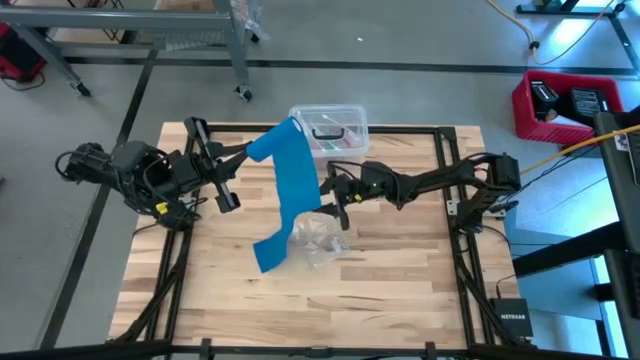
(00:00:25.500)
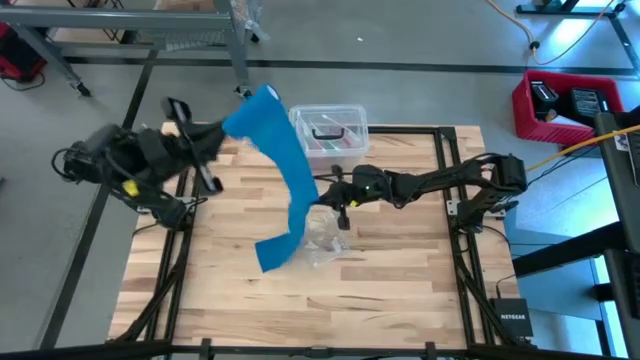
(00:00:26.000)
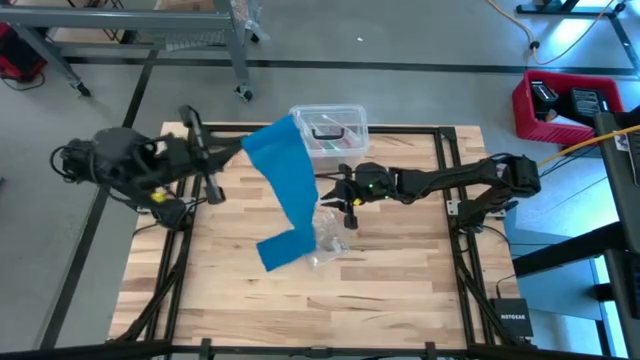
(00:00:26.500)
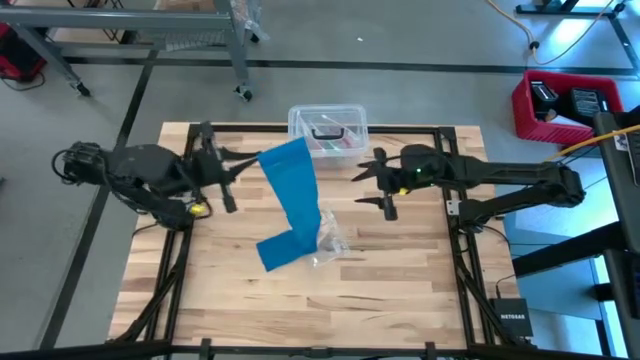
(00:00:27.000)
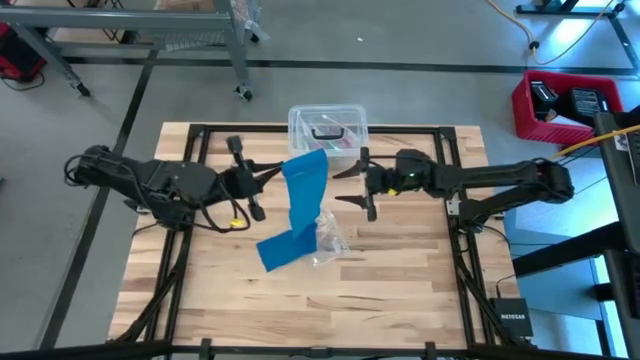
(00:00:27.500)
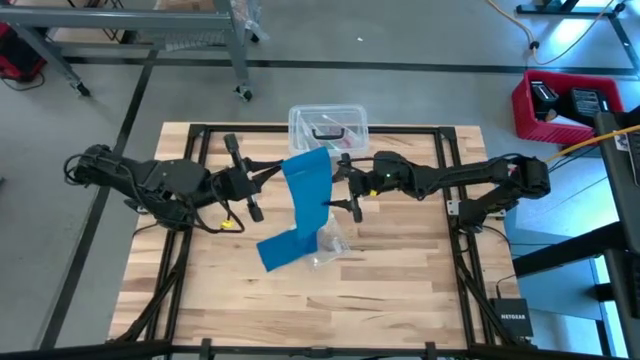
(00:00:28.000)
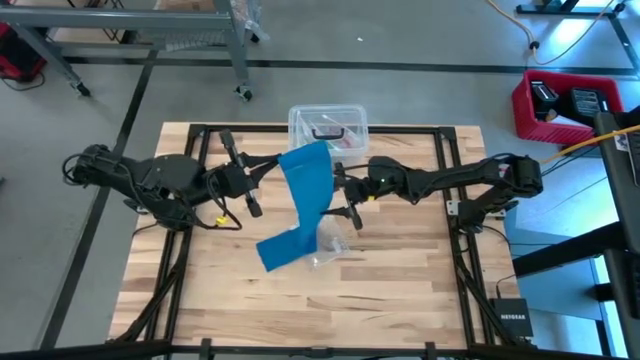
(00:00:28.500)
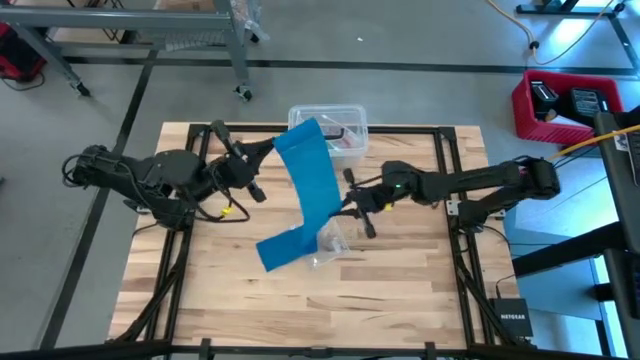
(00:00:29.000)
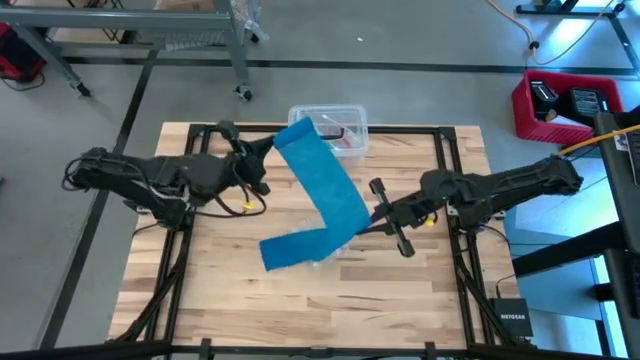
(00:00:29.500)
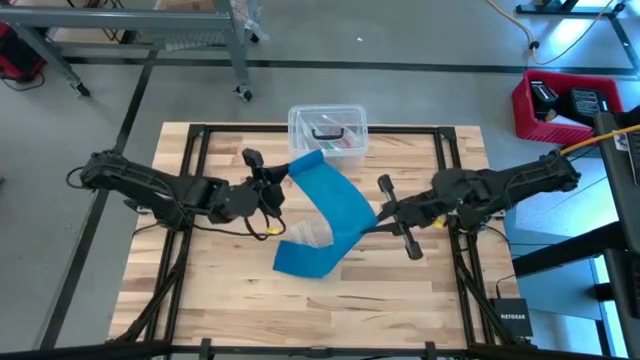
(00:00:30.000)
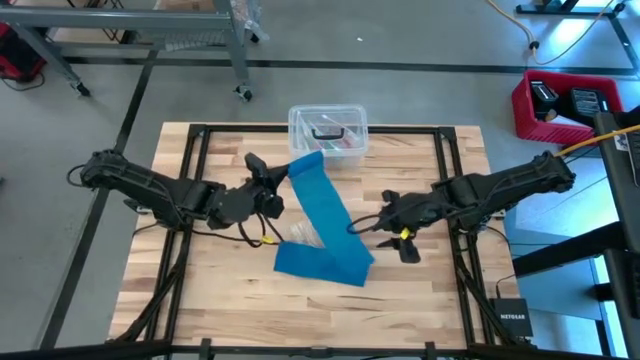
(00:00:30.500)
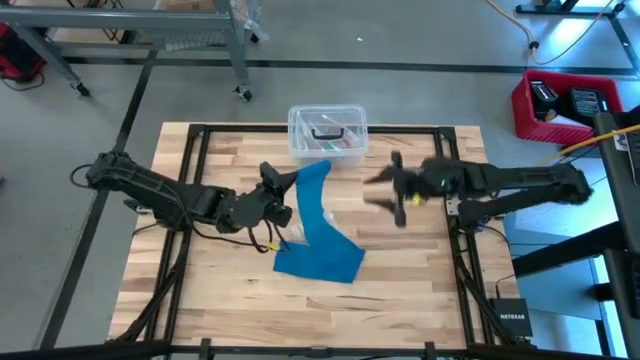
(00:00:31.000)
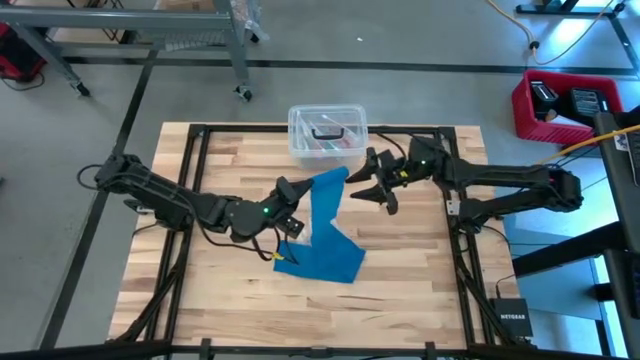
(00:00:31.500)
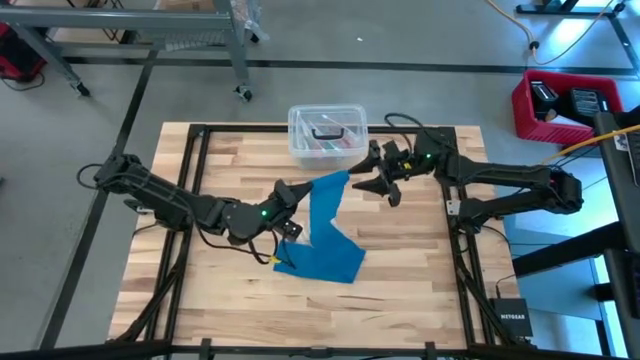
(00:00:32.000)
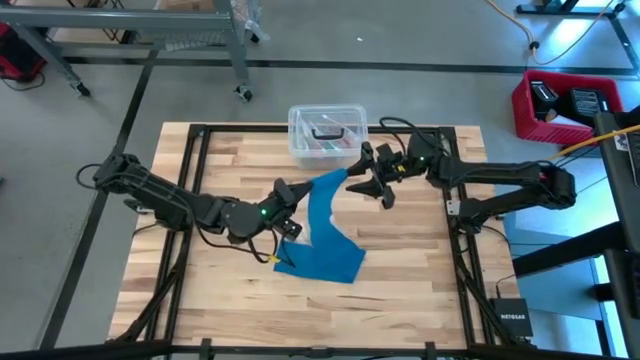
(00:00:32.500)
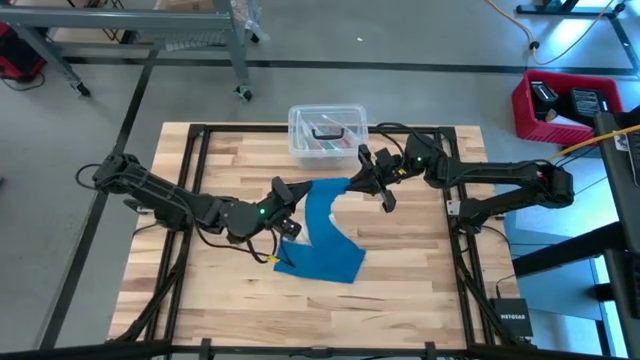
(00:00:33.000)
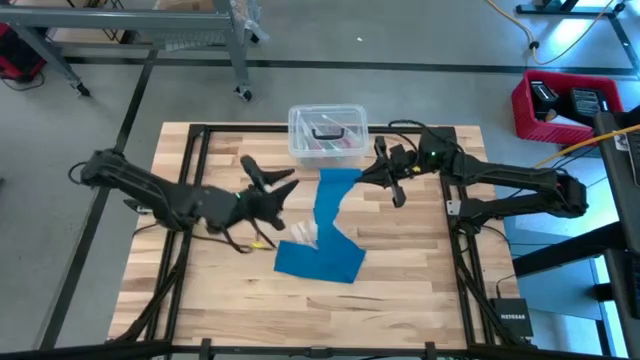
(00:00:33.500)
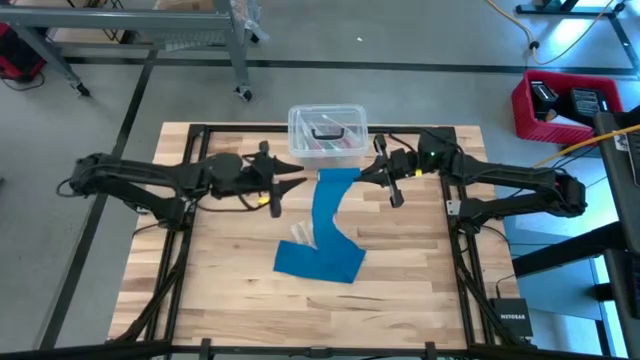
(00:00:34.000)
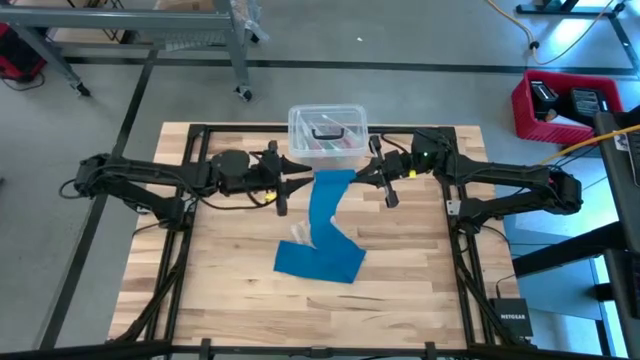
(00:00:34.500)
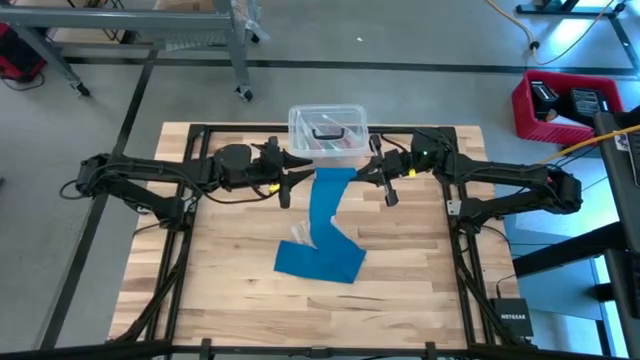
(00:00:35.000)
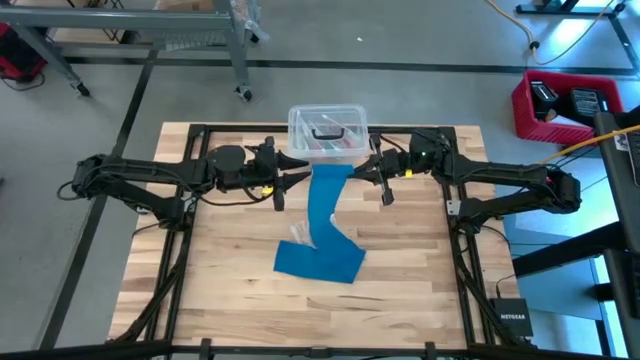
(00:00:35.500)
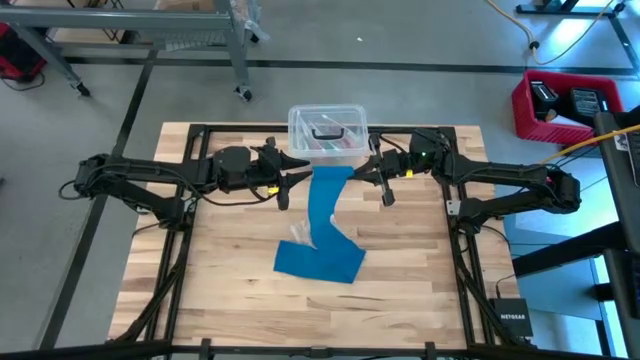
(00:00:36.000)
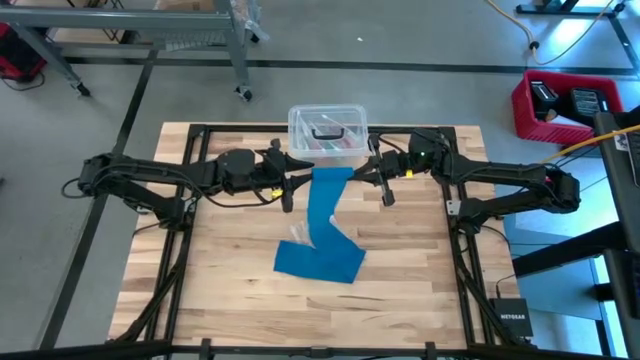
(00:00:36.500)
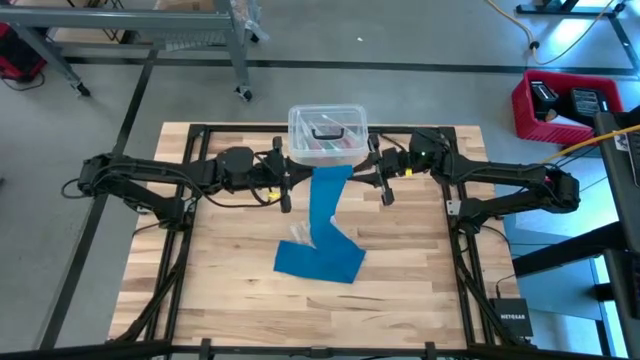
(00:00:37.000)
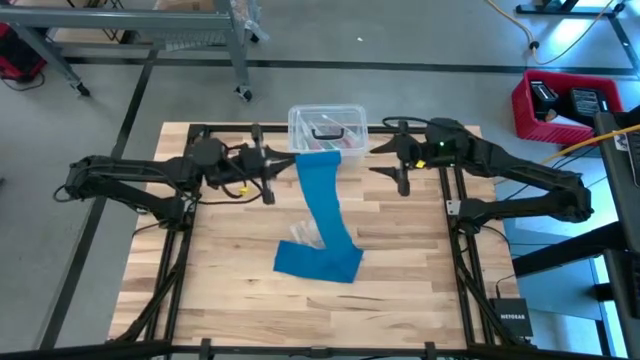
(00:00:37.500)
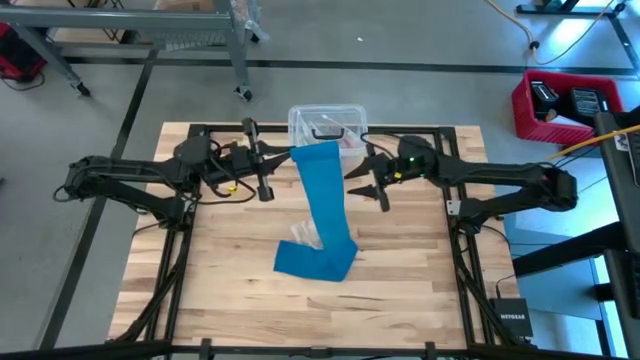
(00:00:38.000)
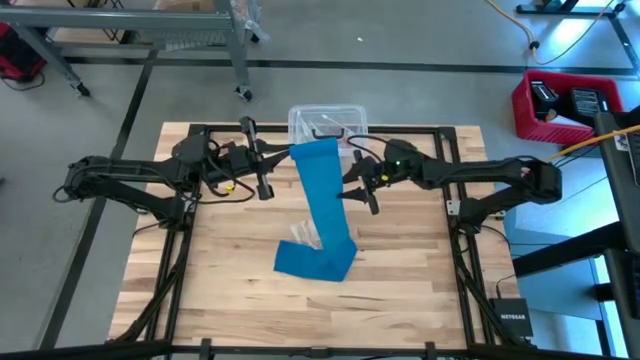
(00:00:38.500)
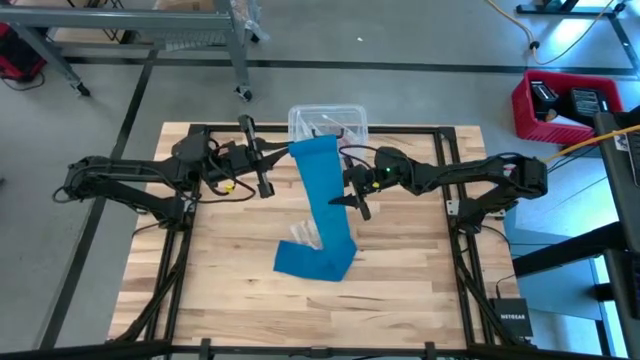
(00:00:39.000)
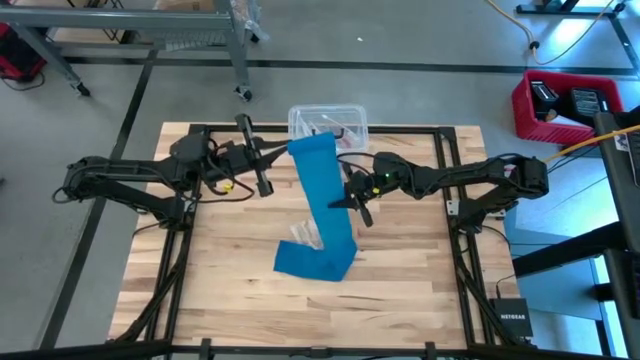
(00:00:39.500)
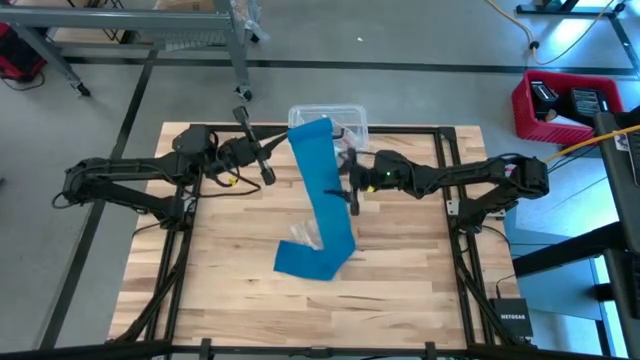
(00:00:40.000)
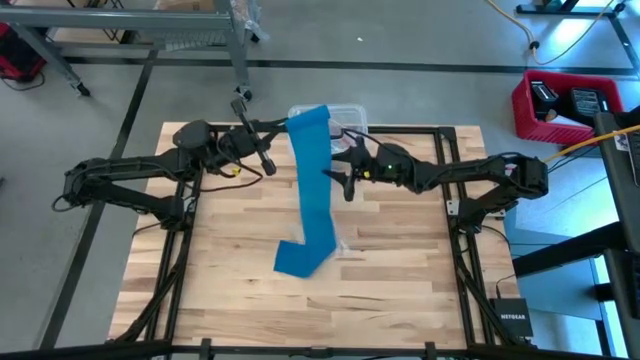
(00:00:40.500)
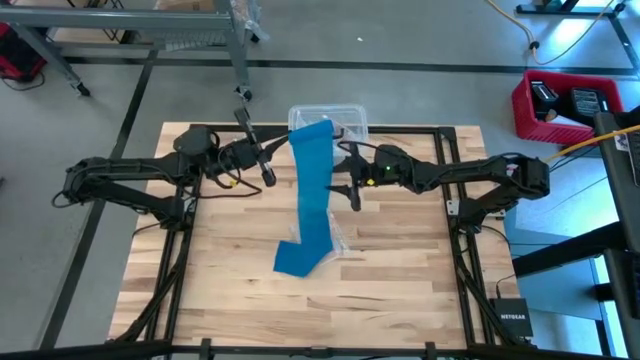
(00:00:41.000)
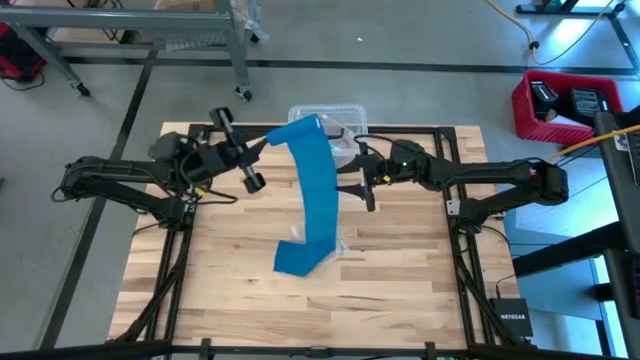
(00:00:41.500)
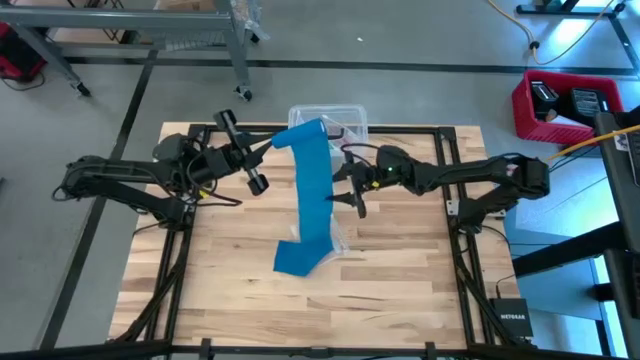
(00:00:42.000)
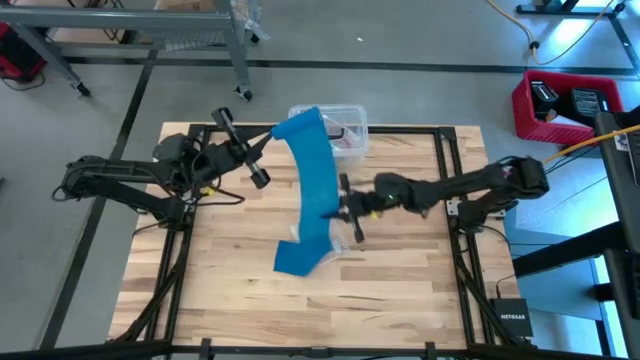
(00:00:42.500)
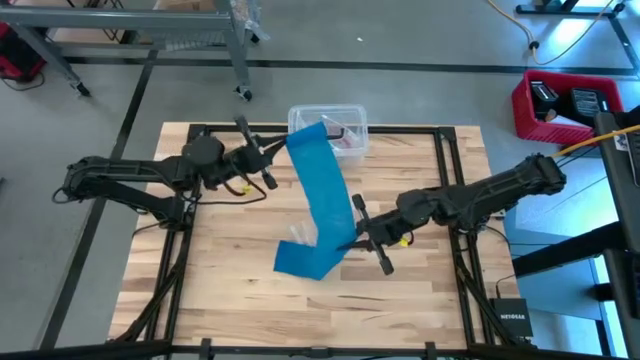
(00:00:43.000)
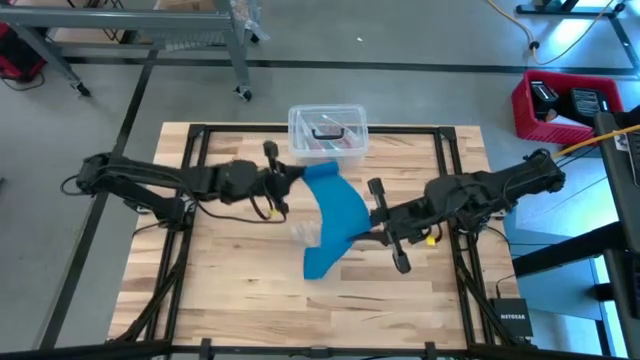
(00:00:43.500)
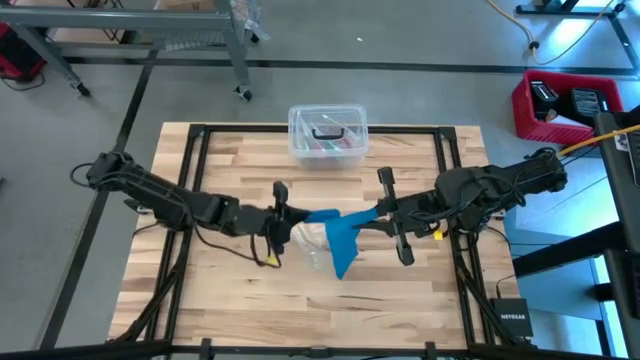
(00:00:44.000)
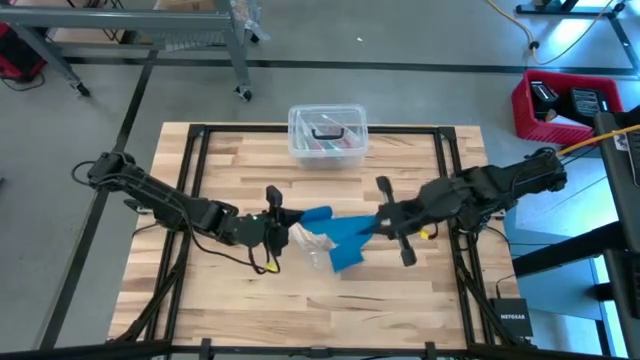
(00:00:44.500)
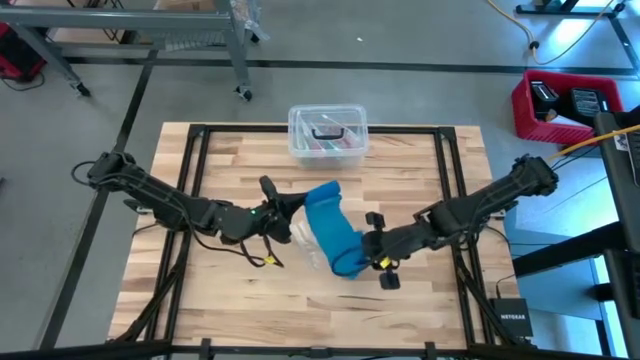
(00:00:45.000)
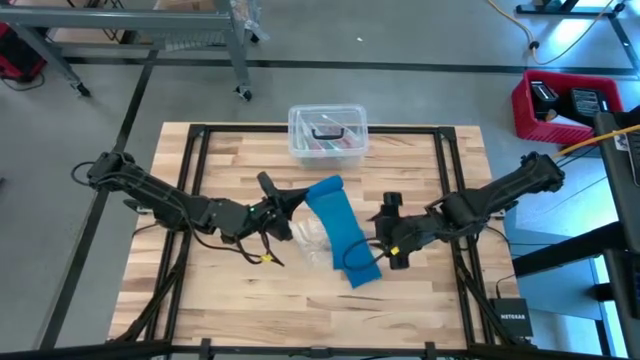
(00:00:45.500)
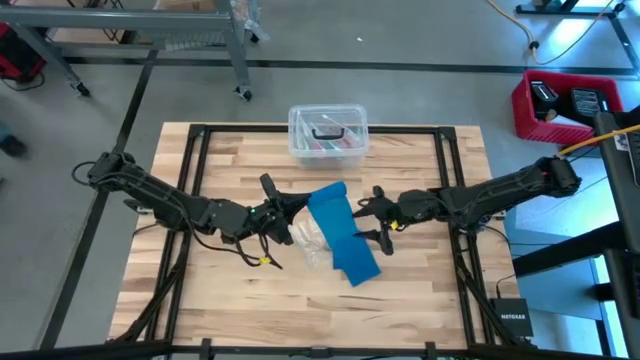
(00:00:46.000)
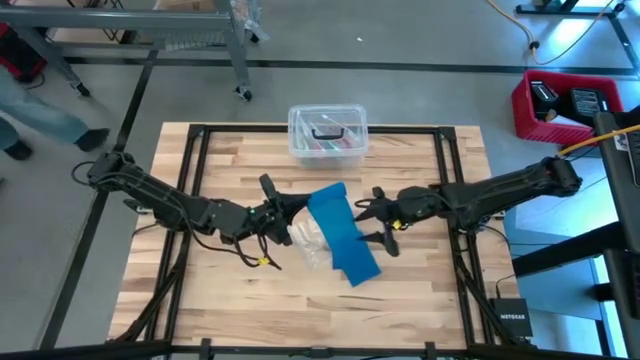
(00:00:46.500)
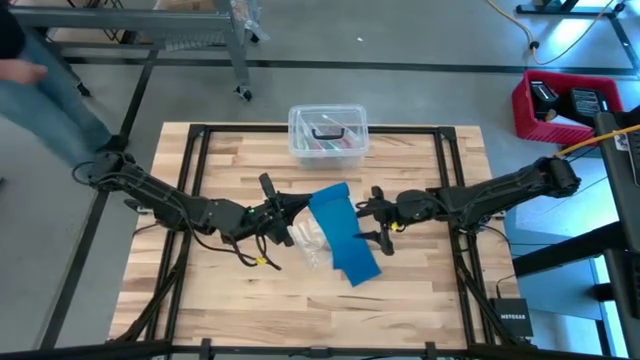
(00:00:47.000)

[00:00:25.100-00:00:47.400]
Task: Roll bandage
Roll the blue bandage
